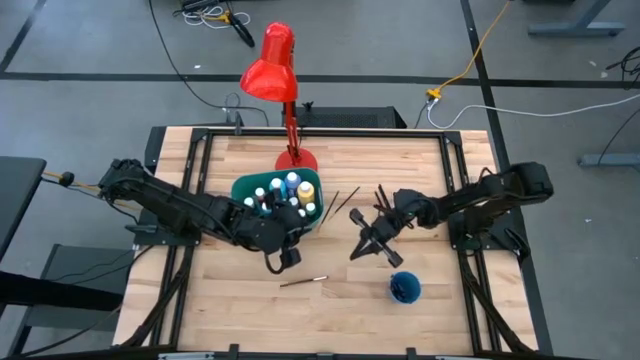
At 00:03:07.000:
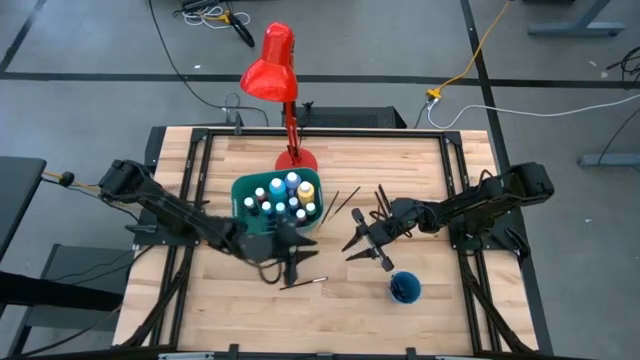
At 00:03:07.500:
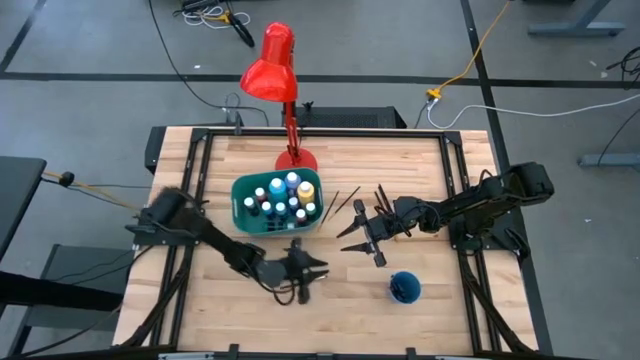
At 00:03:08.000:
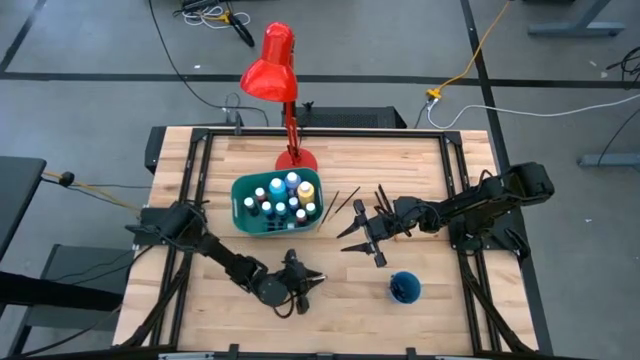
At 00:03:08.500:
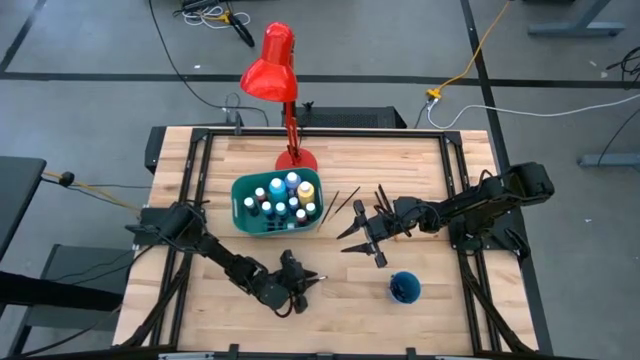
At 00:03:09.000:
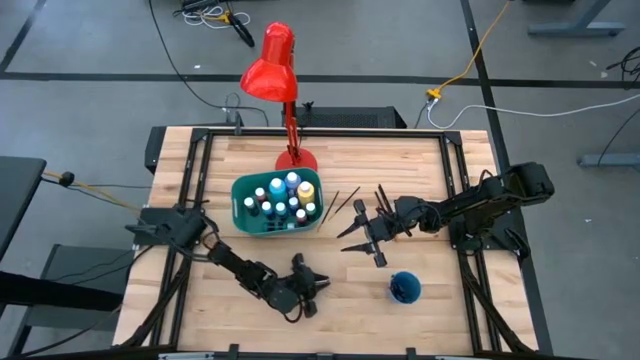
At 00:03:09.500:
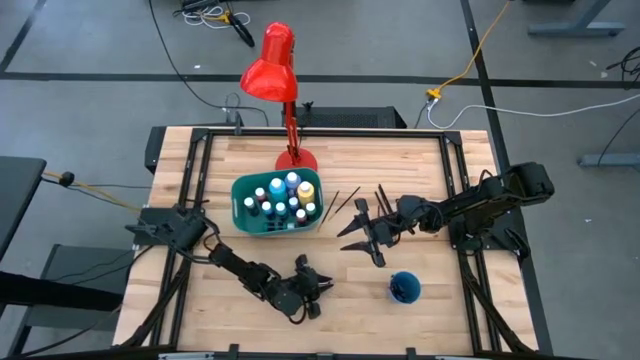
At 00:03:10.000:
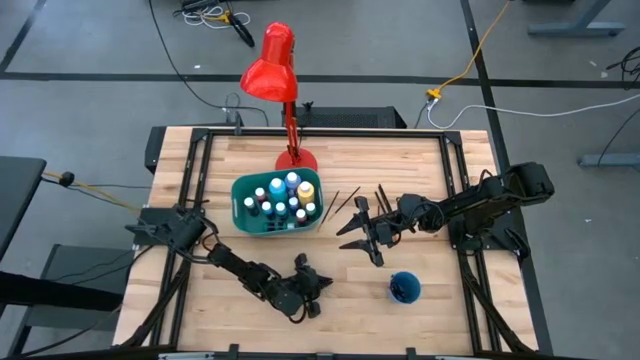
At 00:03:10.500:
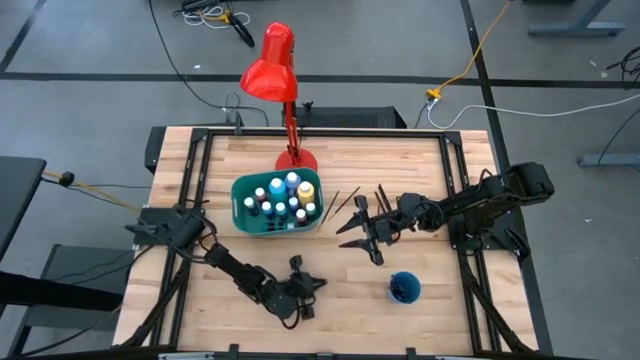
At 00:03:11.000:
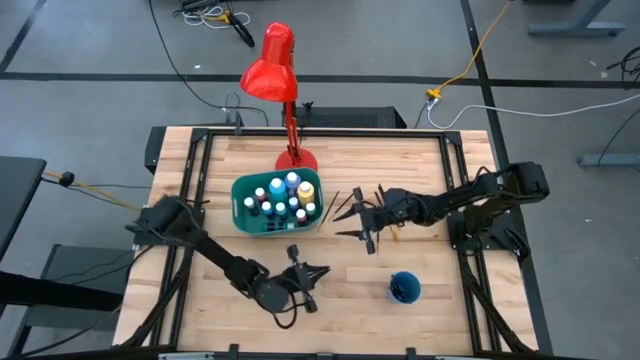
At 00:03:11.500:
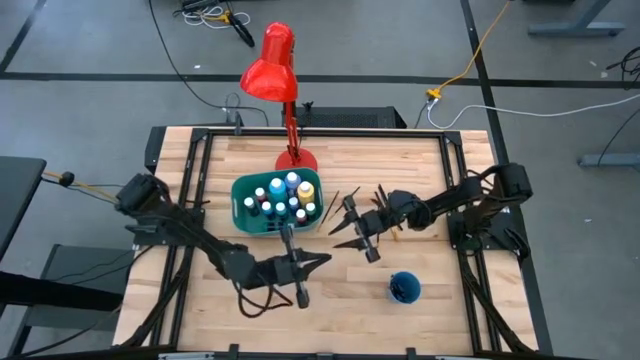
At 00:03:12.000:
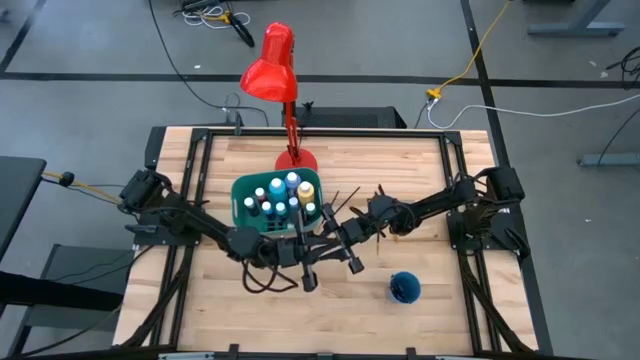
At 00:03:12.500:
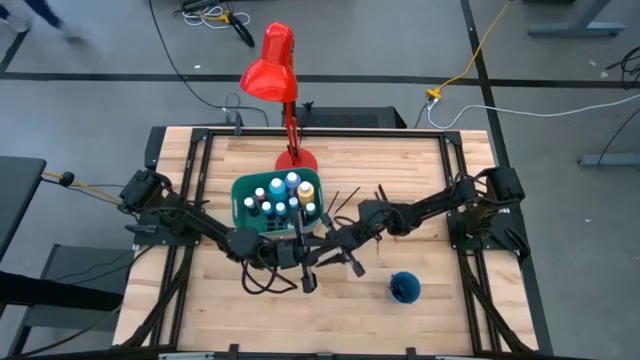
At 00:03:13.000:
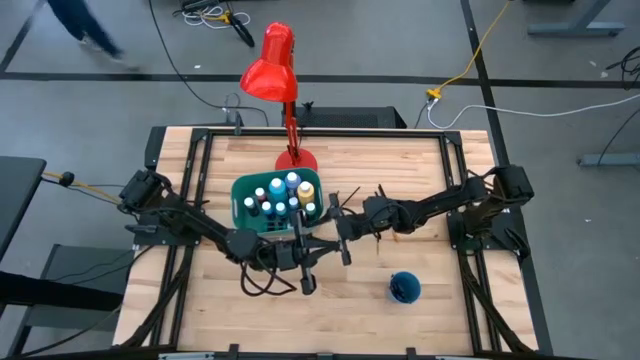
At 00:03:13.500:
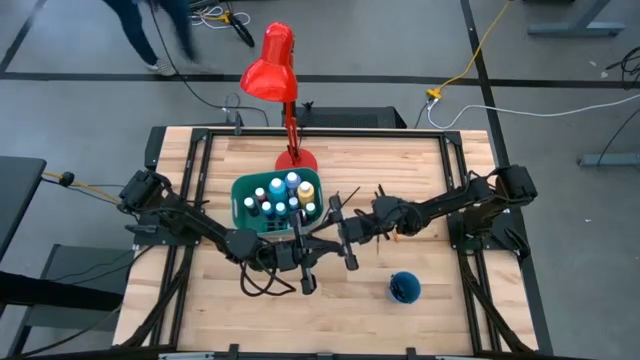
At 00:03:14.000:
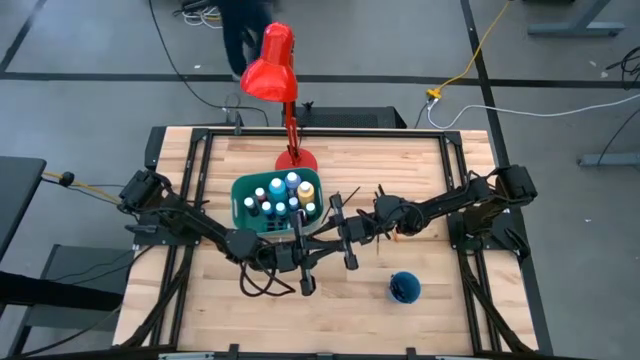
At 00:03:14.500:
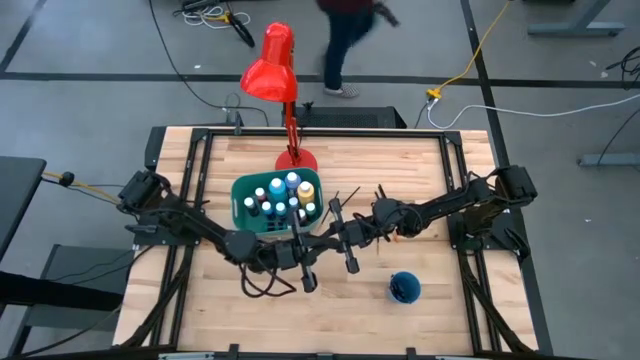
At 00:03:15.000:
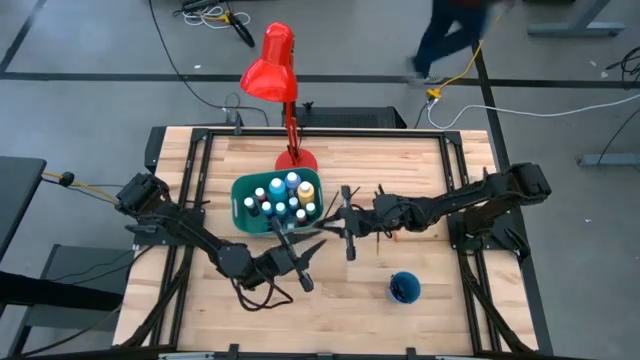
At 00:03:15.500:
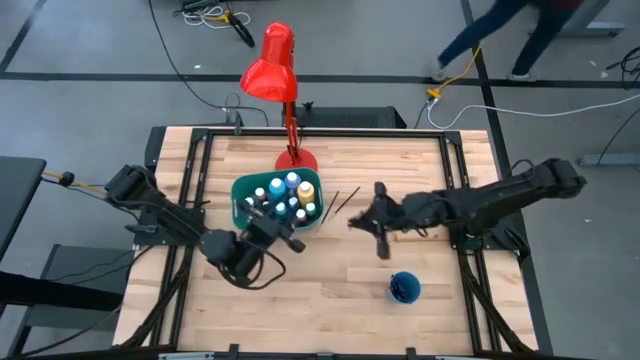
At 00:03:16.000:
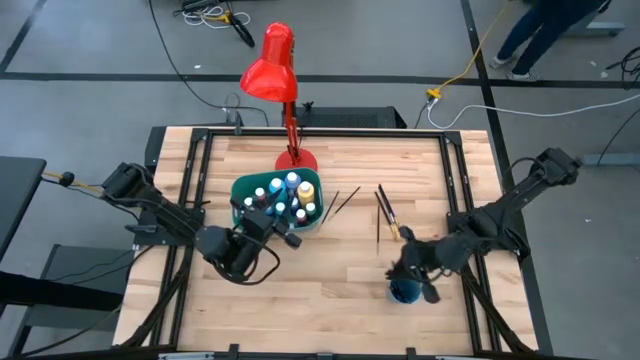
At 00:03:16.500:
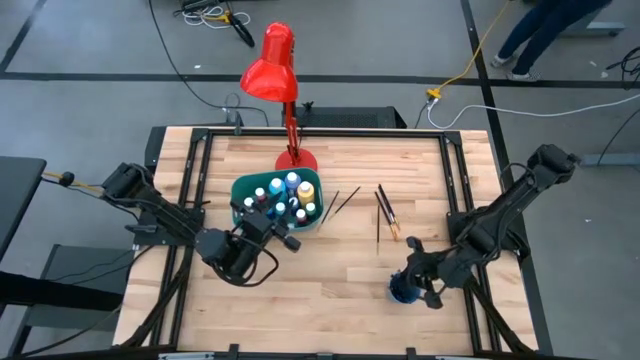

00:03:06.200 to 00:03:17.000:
Task: Pick & Place Paint Supplies
Put the silver paint brush into the blue cup

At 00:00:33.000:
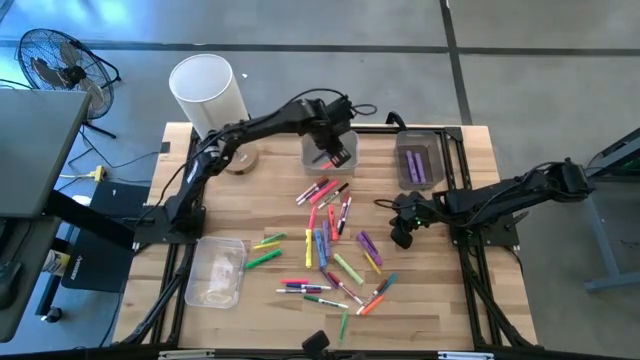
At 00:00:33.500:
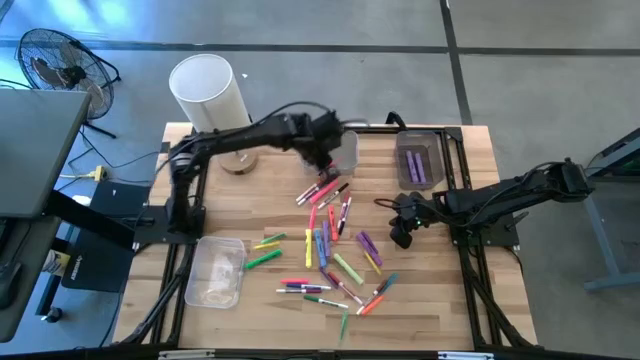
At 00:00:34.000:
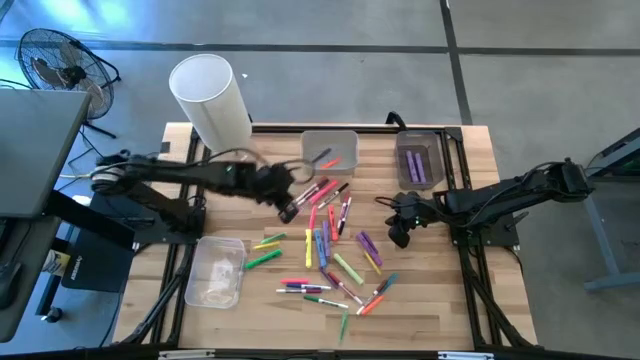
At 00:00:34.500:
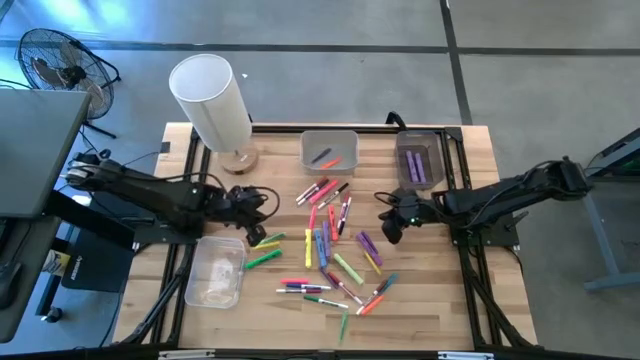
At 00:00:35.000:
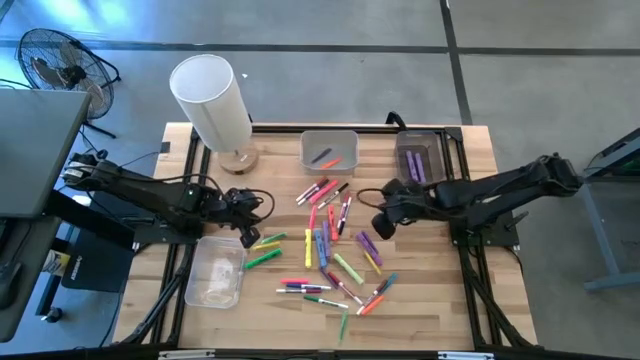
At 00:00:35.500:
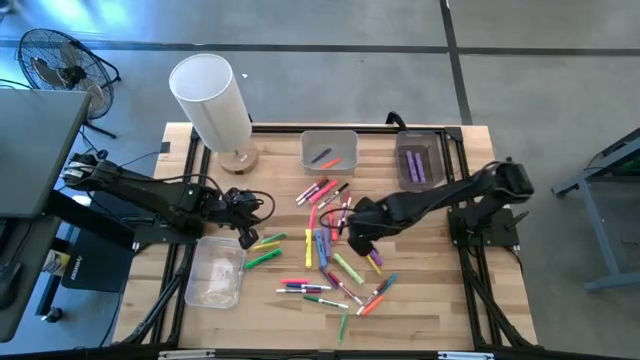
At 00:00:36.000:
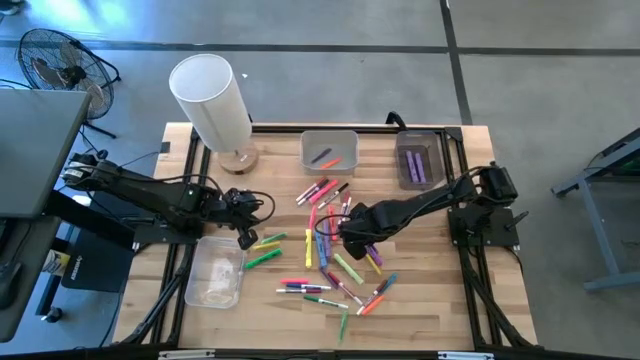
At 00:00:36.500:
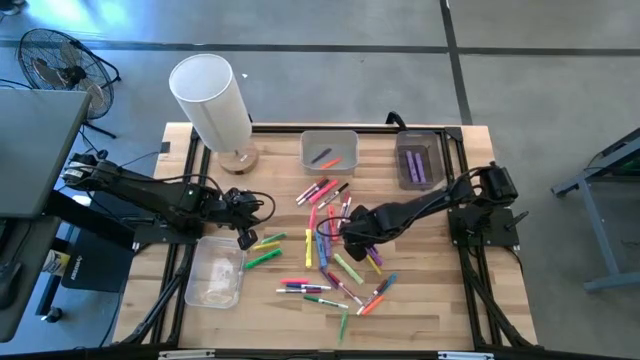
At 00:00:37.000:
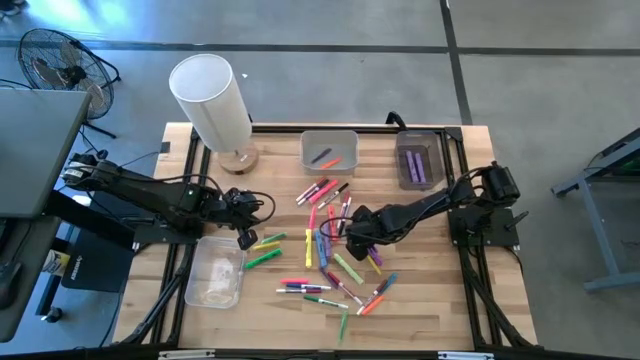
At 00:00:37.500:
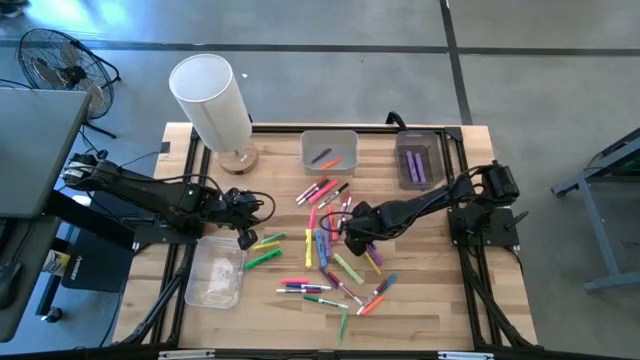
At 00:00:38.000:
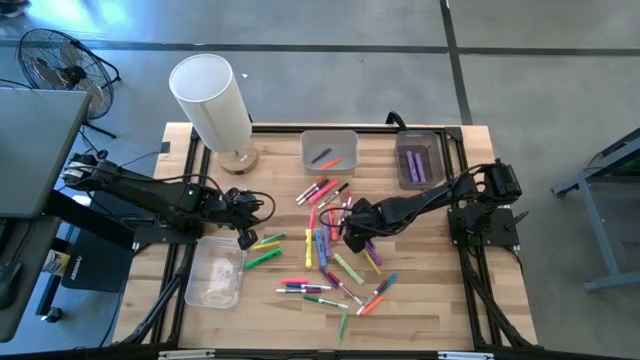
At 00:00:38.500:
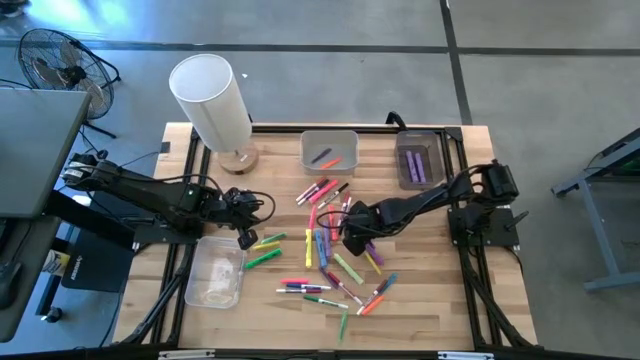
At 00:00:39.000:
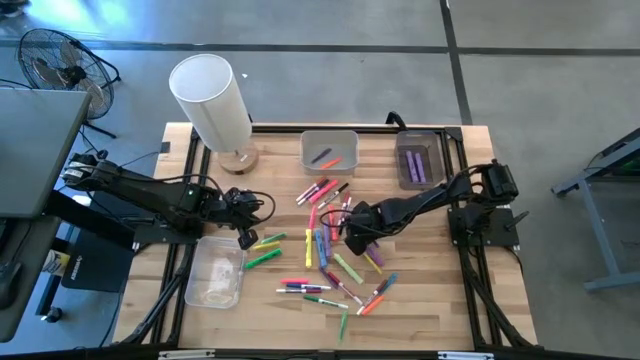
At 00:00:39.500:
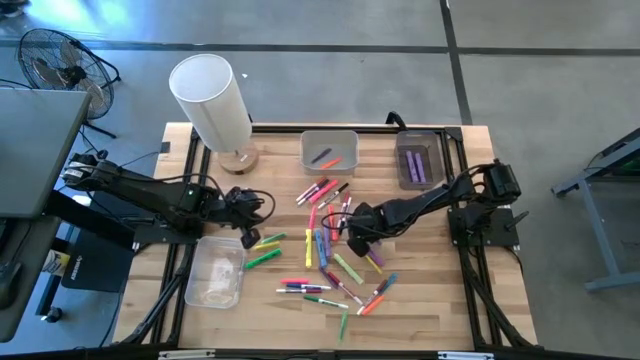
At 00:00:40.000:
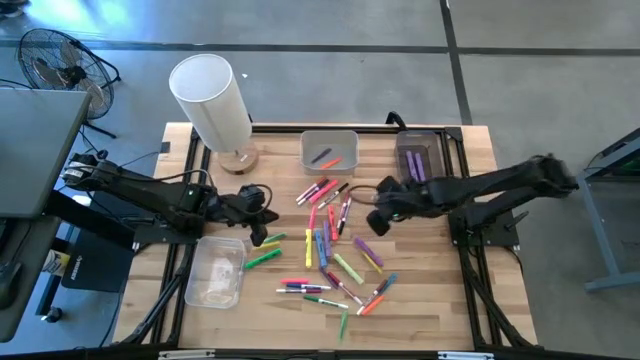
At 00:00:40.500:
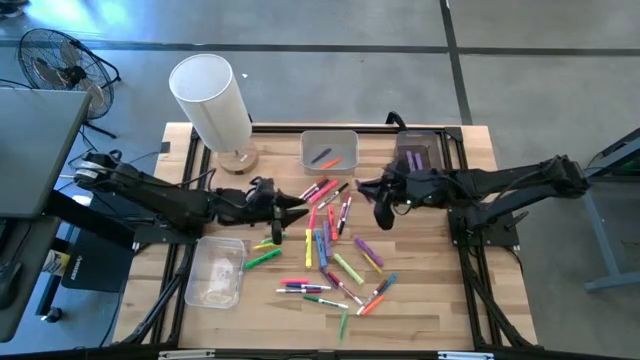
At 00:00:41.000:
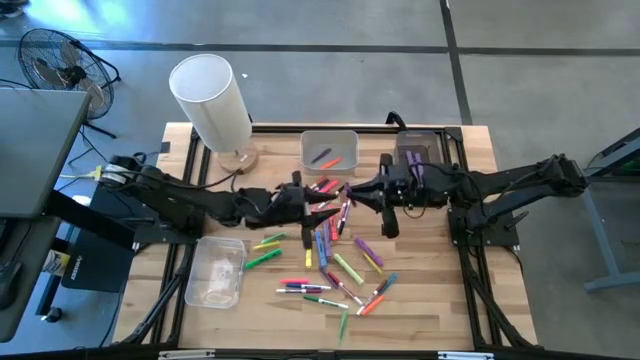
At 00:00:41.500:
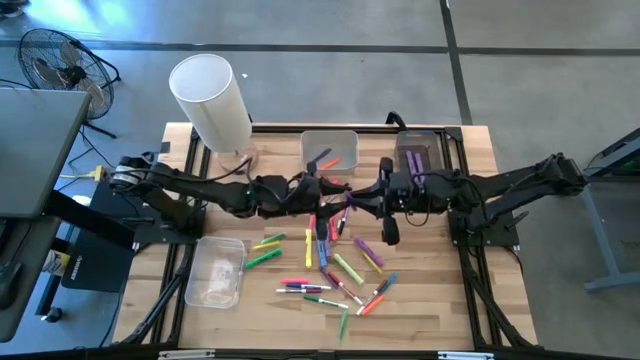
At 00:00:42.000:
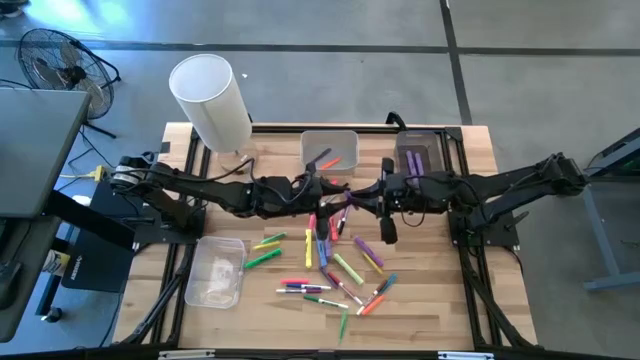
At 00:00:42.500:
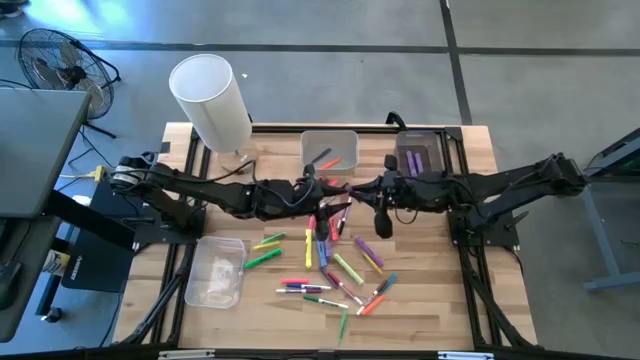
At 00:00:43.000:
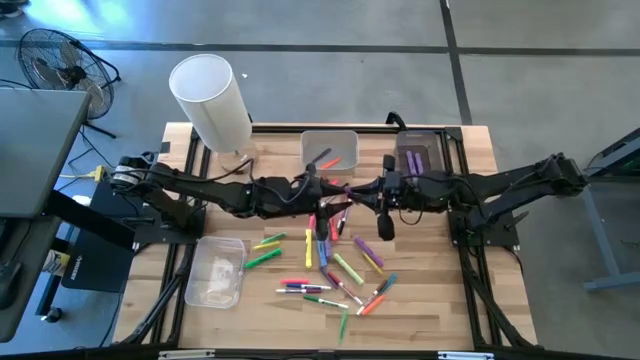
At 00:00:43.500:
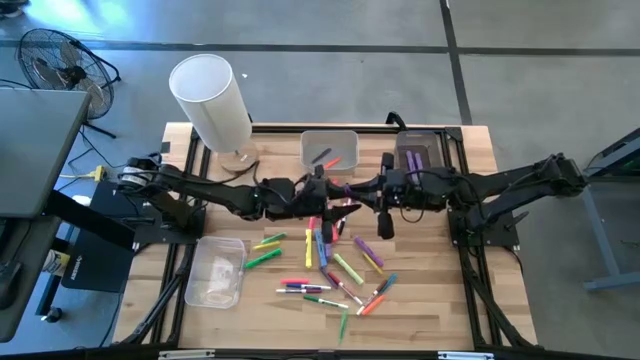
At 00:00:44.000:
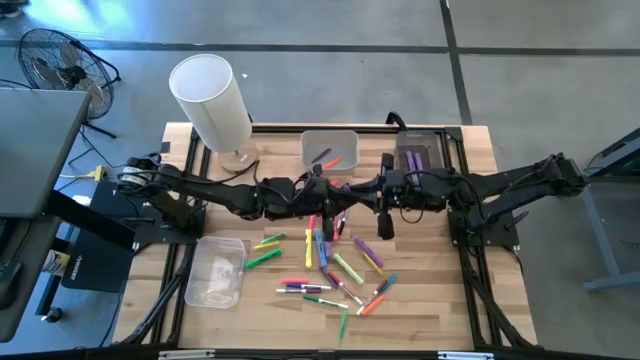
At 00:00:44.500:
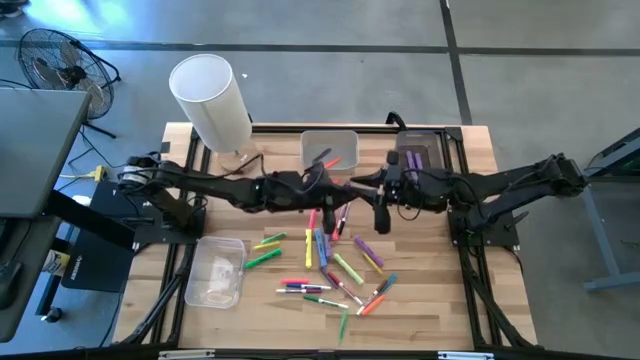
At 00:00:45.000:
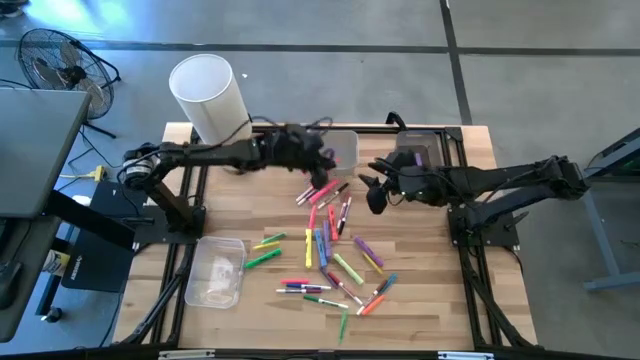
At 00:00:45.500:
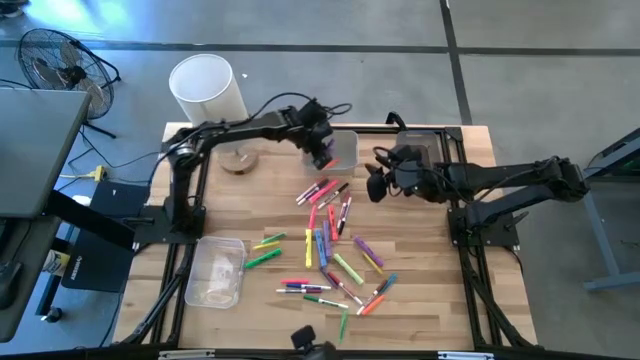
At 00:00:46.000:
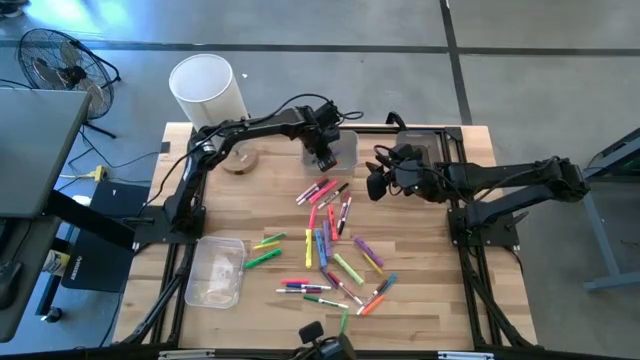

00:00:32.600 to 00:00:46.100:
Task: Pick & Place Markers
Put the purple pen into the white bin
